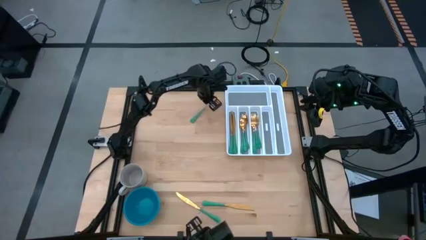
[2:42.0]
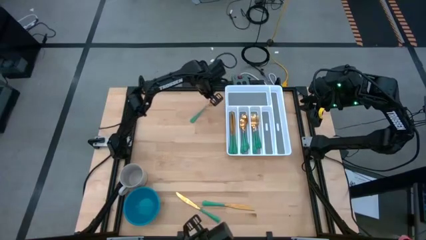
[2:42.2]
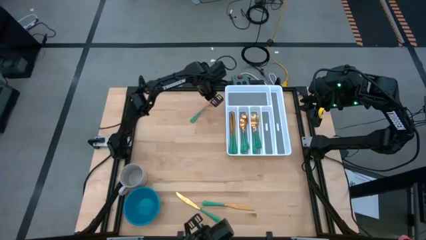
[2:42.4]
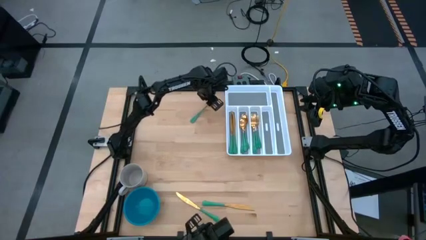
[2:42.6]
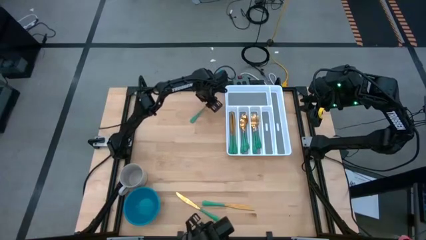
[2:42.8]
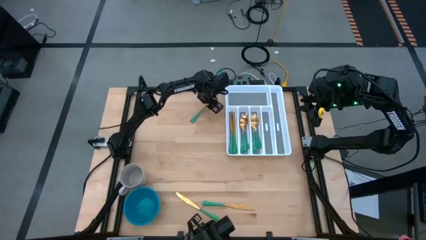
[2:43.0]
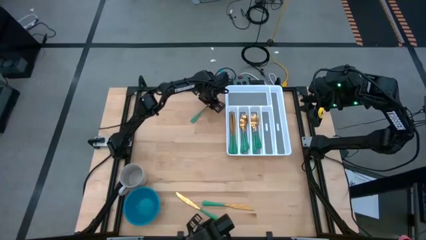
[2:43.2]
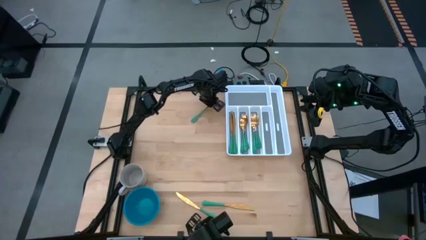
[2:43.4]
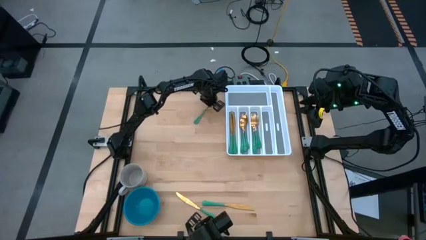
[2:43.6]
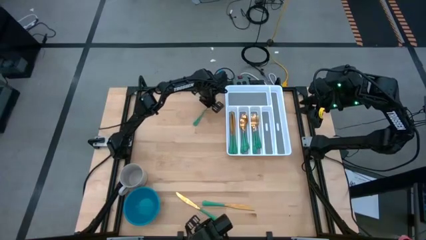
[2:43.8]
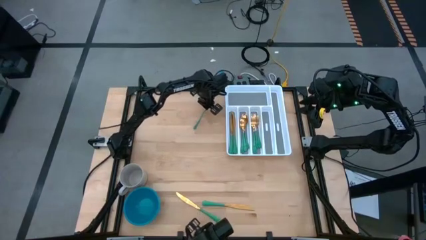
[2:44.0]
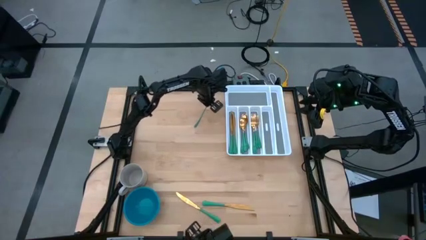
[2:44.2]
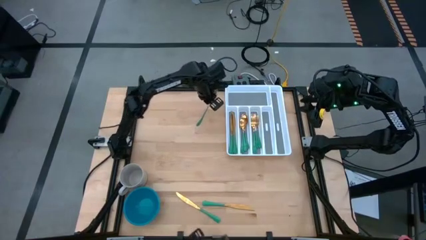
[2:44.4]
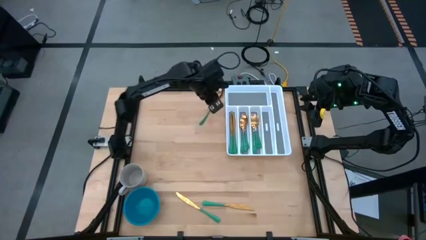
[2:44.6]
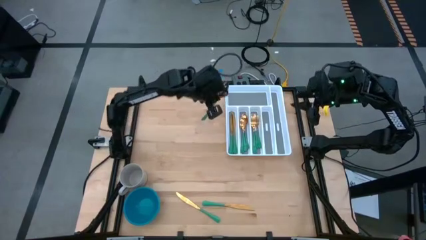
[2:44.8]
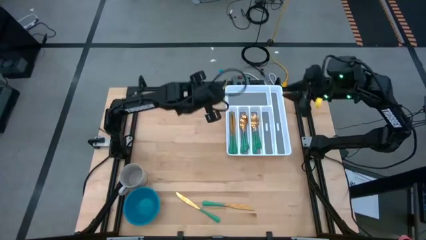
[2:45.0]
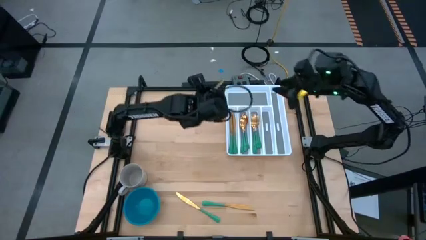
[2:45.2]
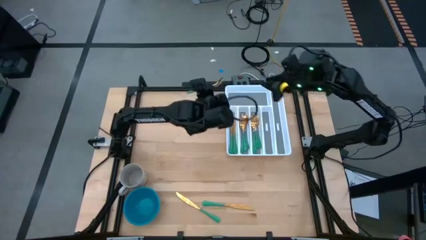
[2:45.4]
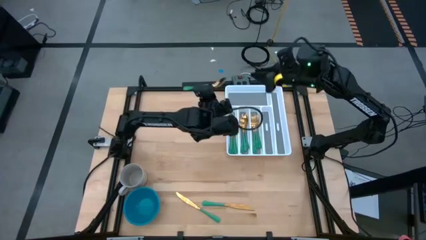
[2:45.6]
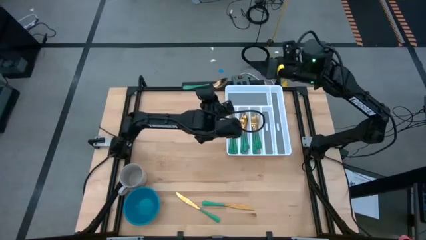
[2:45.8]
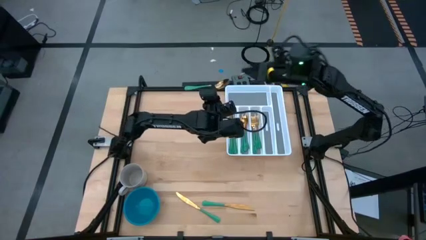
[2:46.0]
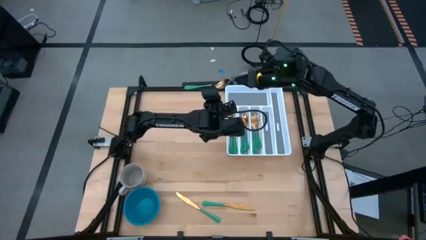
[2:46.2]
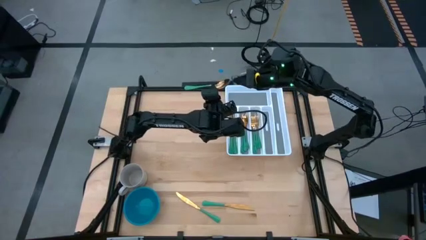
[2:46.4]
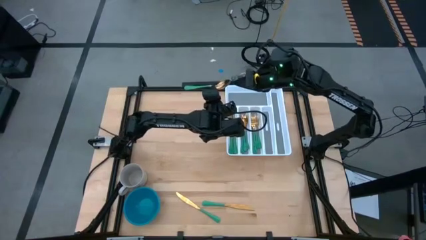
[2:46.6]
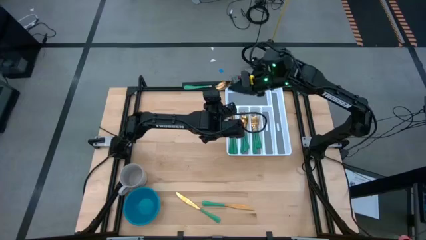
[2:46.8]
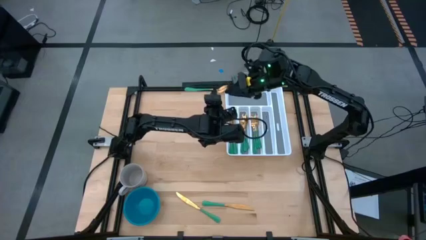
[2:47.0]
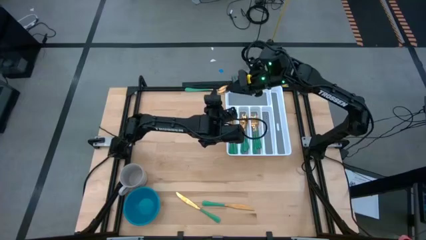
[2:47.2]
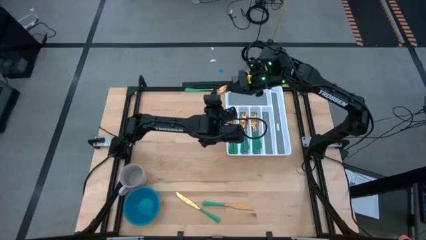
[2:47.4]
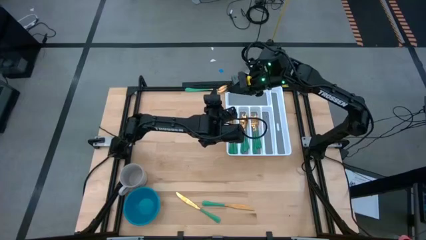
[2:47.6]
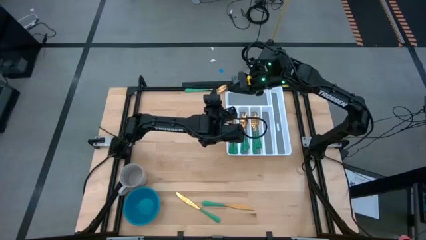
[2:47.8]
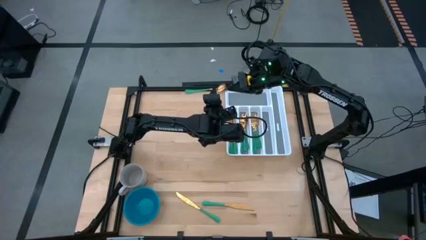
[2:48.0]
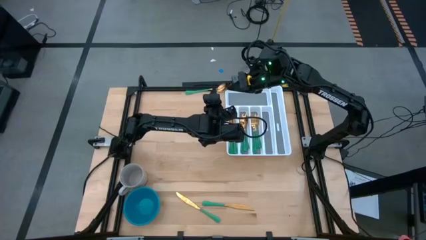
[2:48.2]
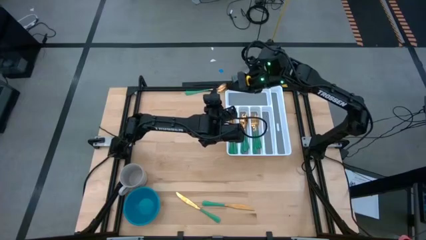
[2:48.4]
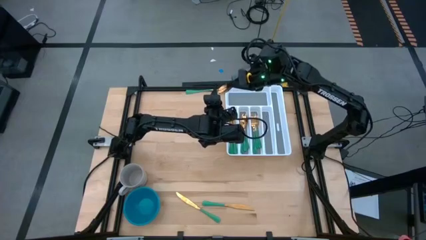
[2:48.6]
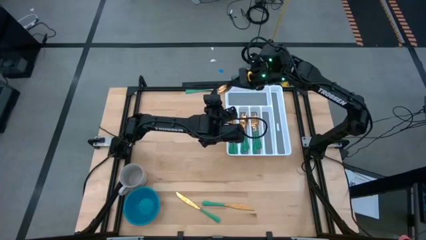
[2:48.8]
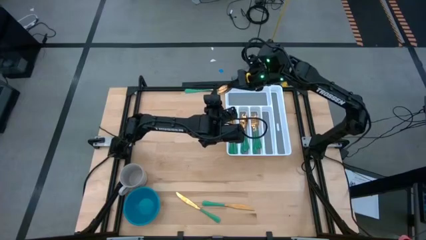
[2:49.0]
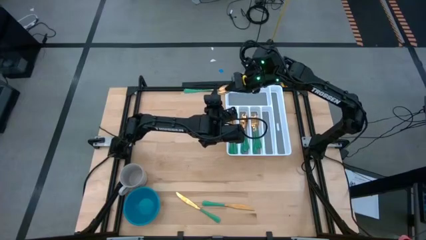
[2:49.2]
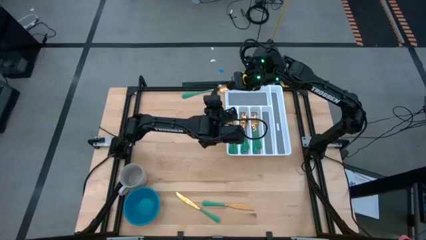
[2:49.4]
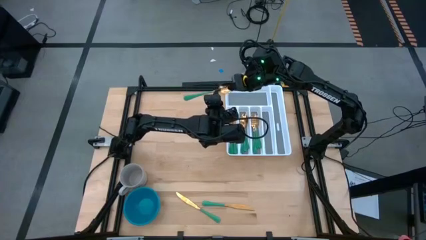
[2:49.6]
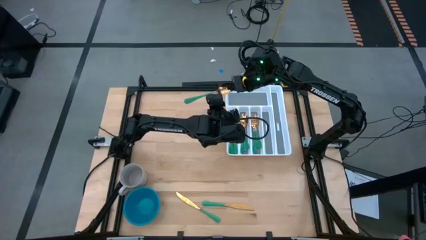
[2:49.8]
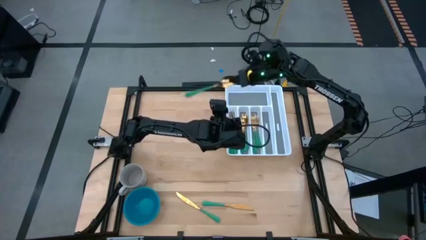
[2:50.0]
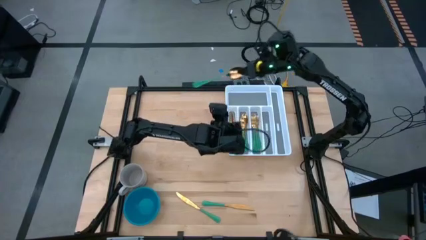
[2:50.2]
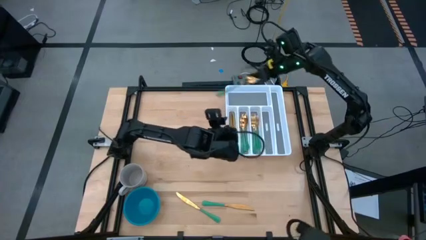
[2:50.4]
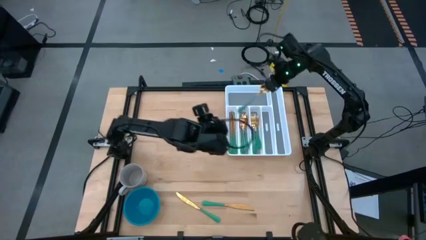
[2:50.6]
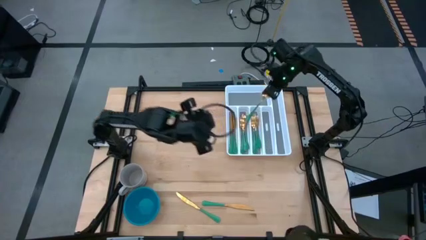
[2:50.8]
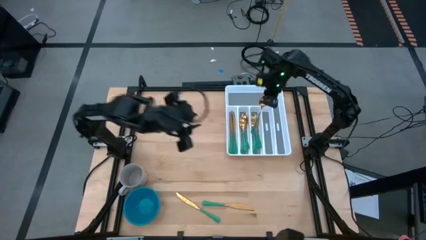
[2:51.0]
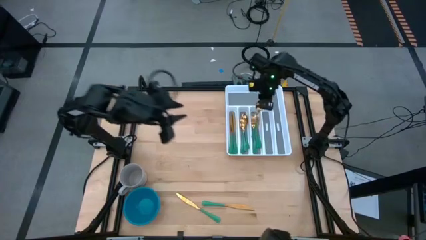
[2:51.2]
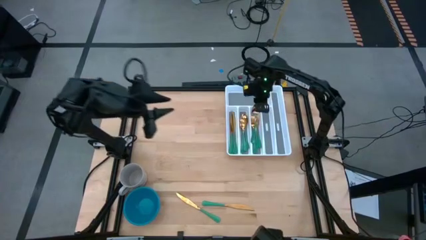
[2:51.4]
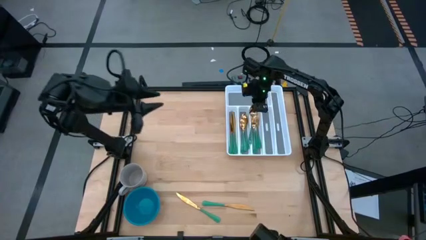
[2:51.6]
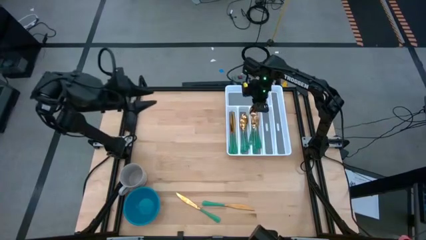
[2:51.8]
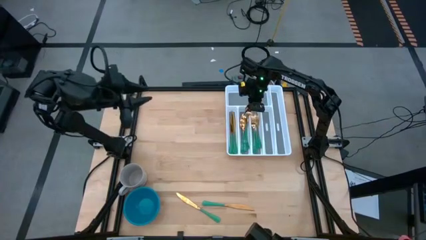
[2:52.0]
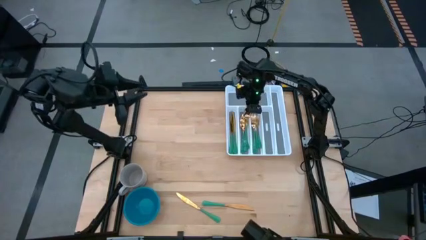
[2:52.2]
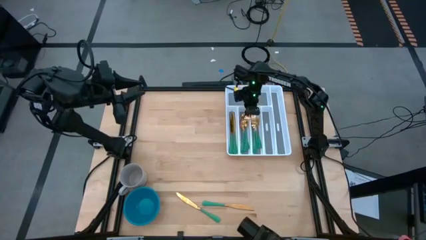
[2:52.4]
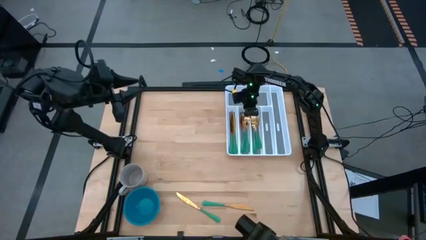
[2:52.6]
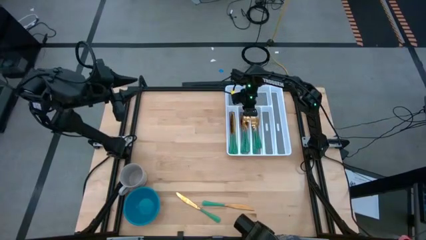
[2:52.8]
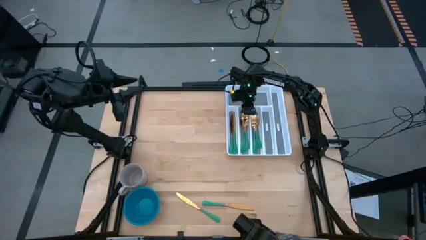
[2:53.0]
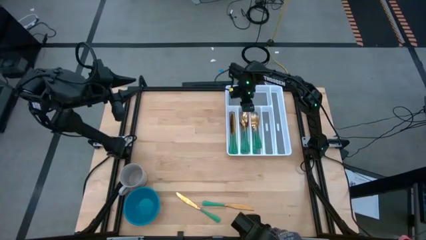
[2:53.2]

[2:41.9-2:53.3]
Task: Sort silverware
Put the green spoon into the white cutlery tray

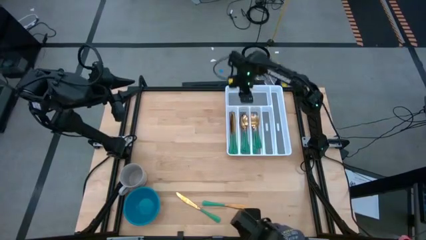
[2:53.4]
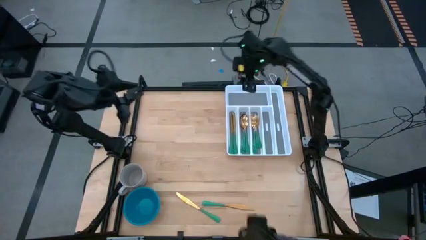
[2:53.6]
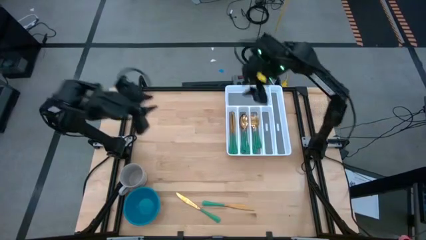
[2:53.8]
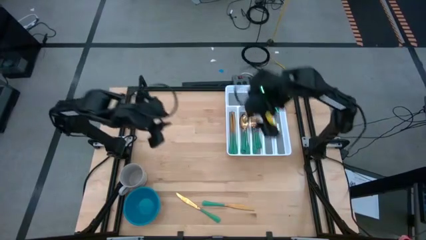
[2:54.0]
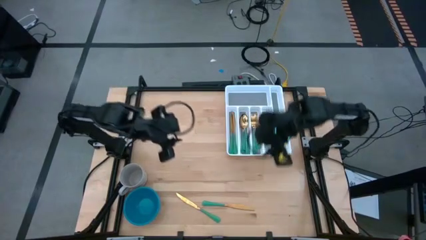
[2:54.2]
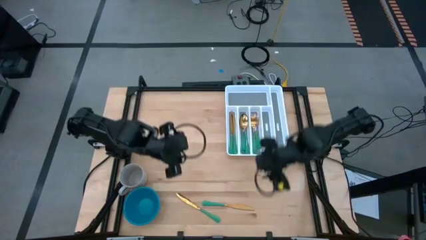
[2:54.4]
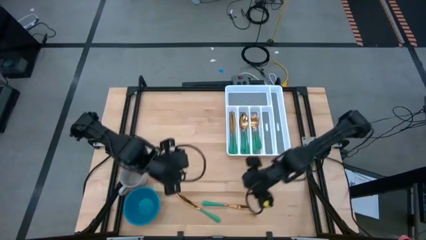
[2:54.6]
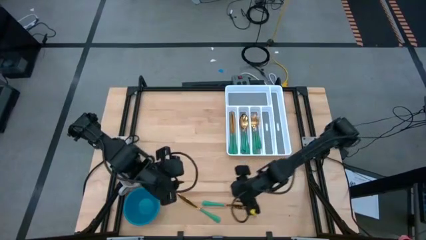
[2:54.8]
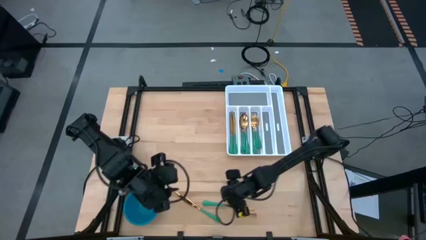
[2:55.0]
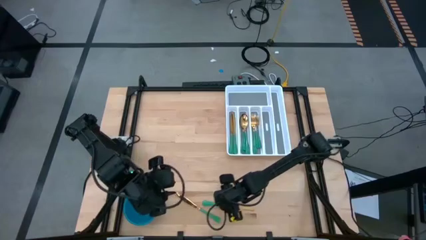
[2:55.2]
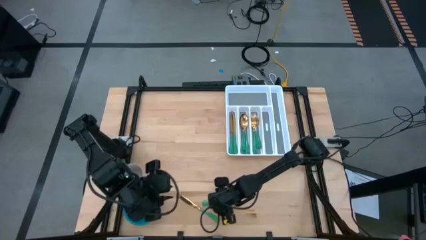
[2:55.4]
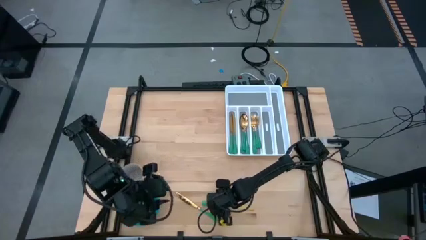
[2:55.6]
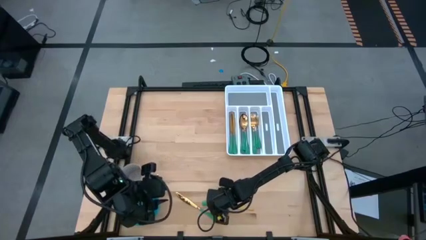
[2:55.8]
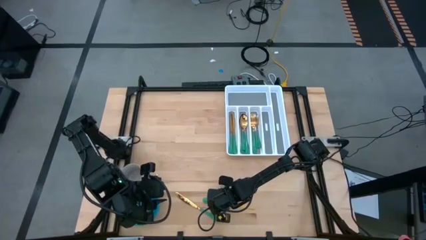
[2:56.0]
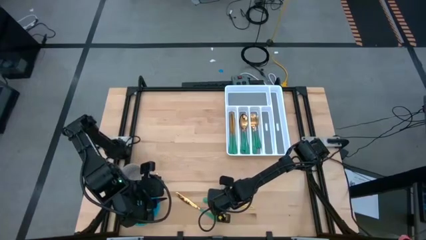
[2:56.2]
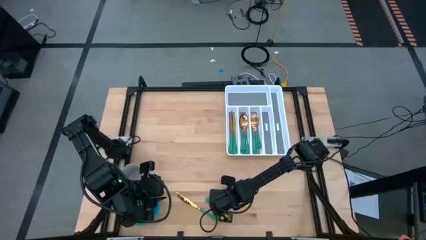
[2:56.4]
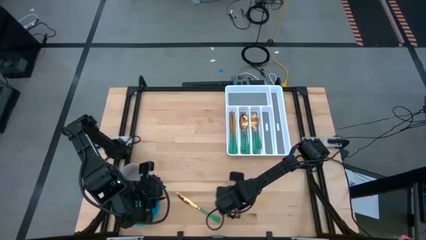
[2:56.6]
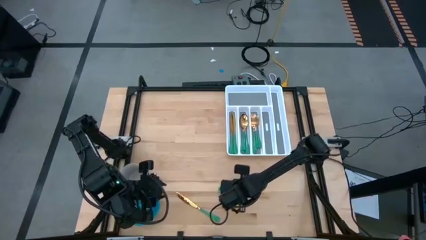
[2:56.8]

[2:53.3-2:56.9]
Put the right green table knife into the white cutlery tray
